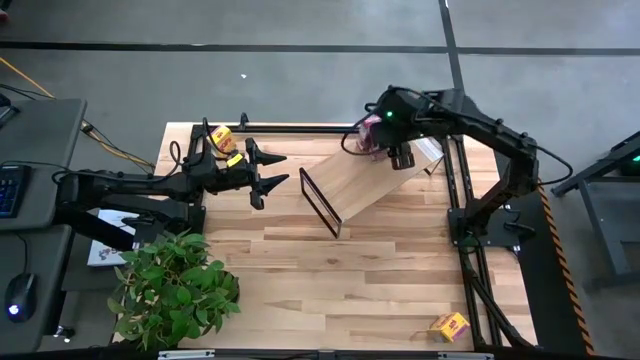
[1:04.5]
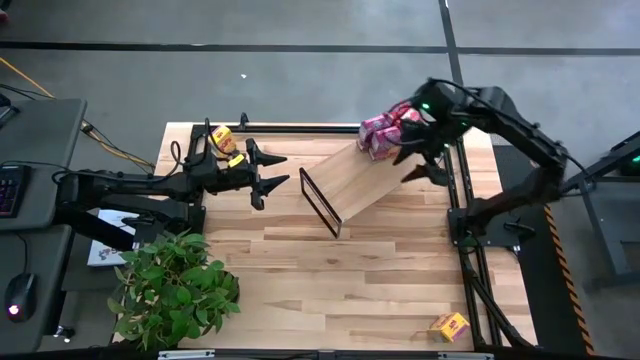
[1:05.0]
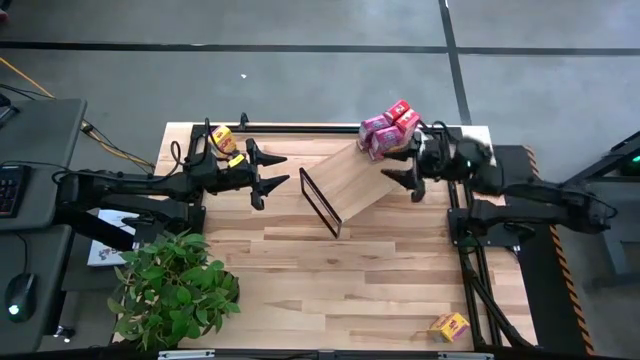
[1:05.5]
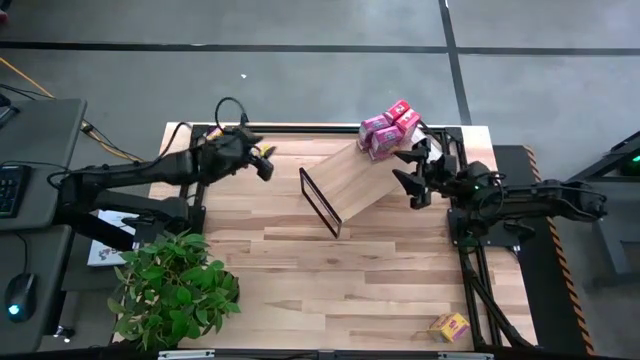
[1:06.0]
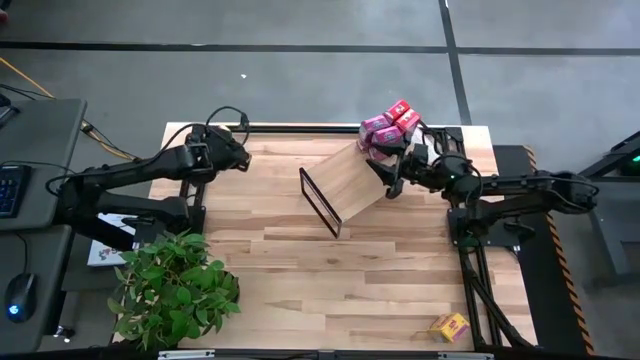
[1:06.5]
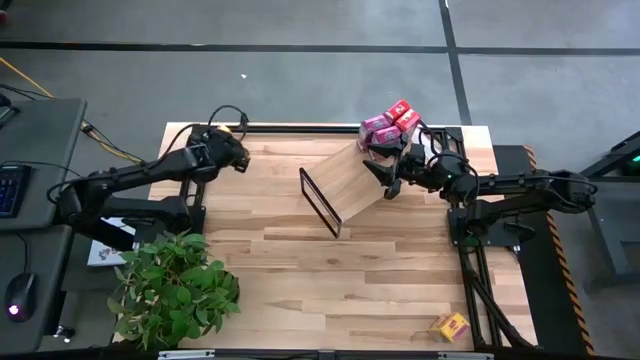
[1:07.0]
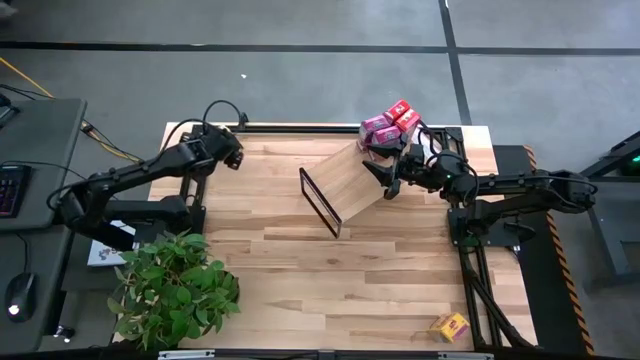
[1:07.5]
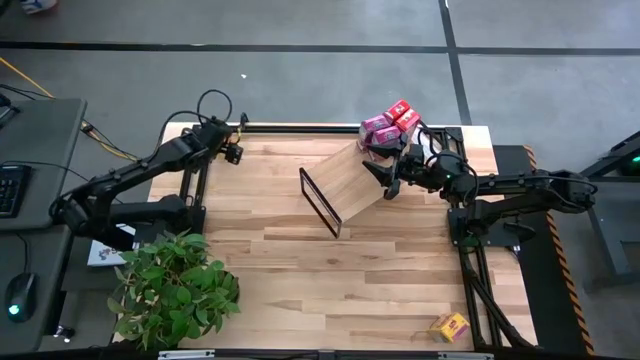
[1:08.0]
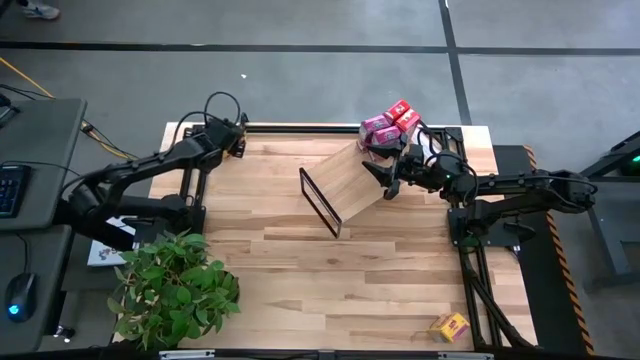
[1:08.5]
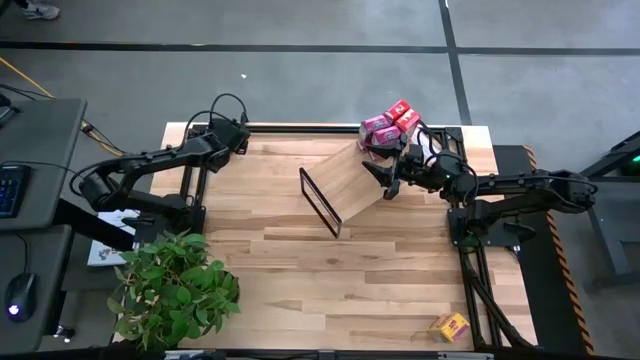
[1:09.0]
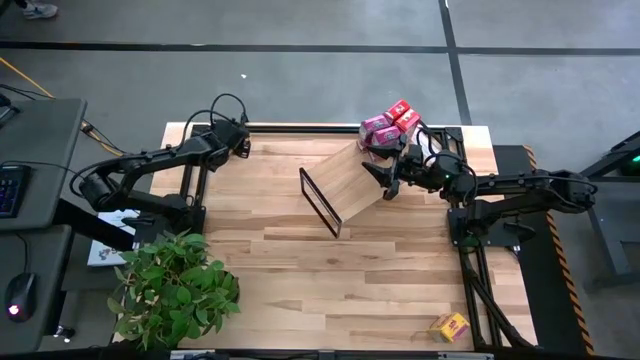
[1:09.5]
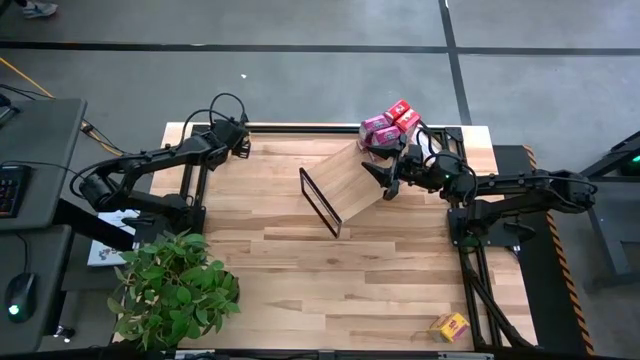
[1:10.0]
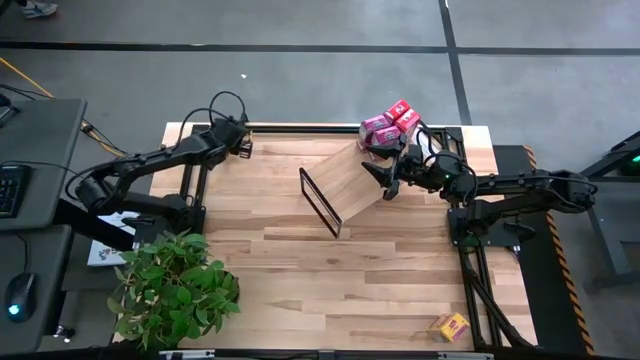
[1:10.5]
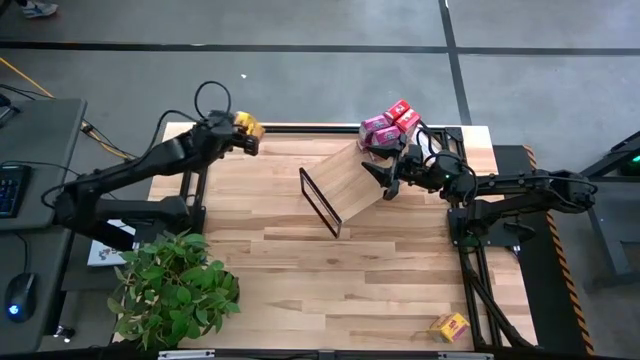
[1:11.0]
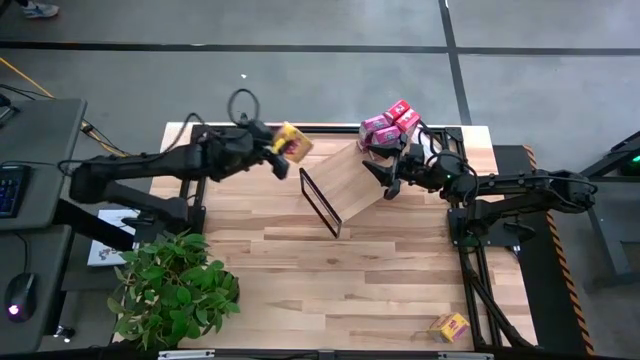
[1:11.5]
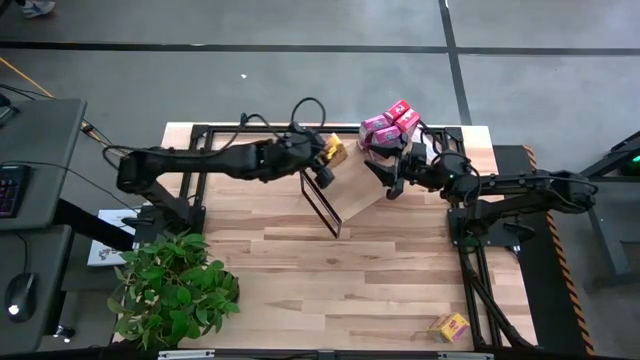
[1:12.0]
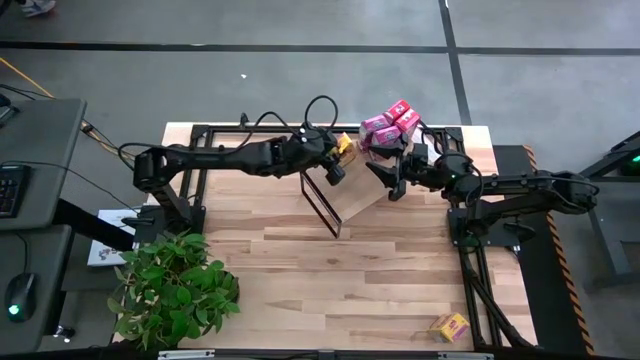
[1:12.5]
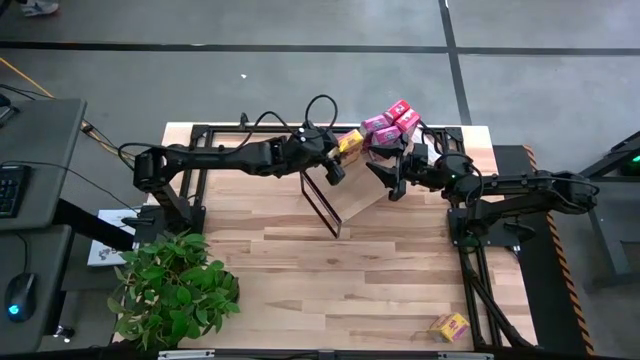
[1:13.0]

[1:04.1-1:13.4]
Task: Stack cereal on shelf
Put the top yellow cereal box on the shelf

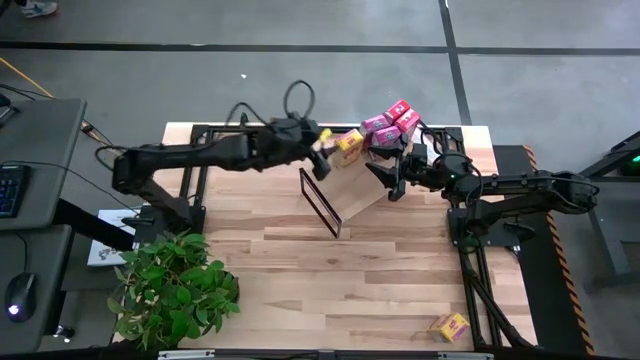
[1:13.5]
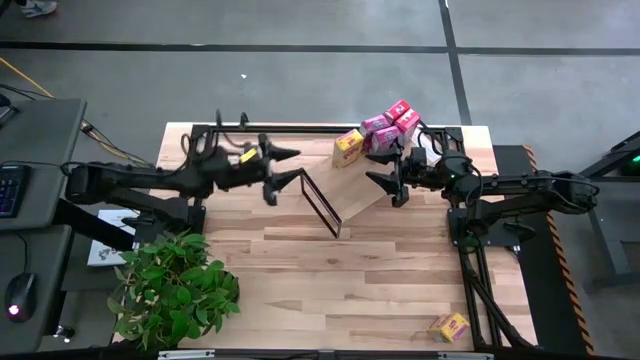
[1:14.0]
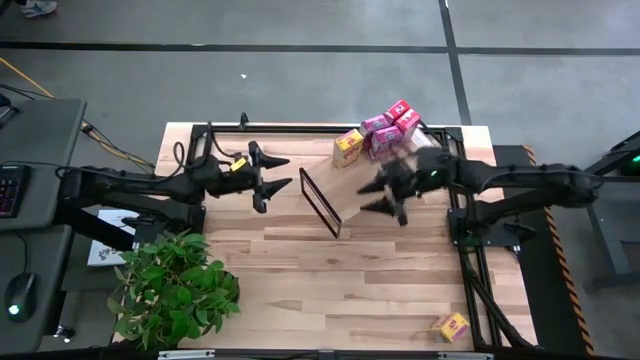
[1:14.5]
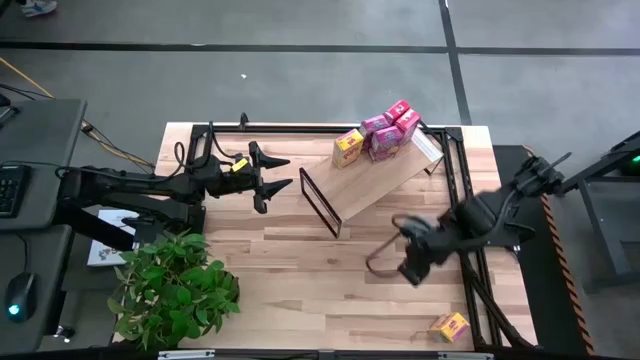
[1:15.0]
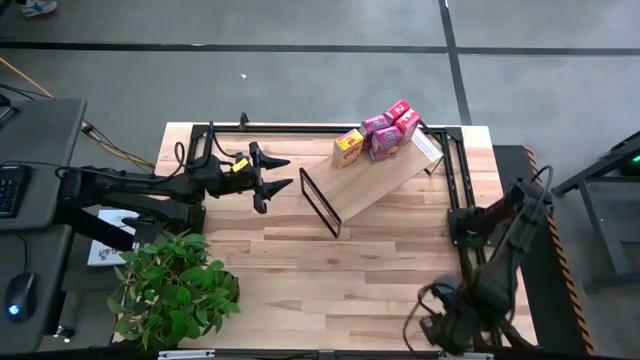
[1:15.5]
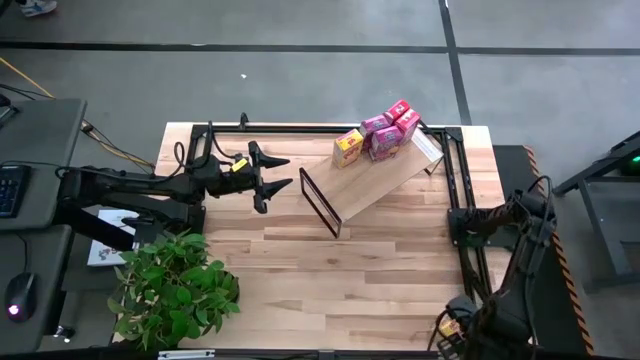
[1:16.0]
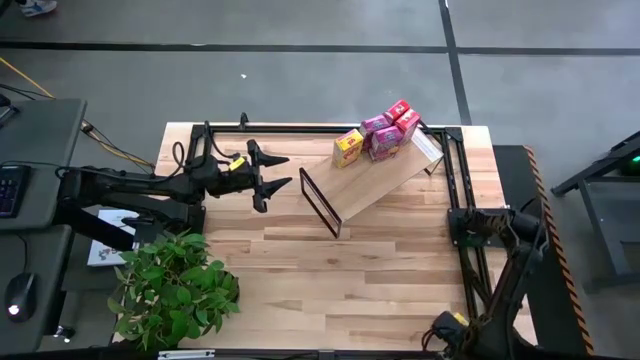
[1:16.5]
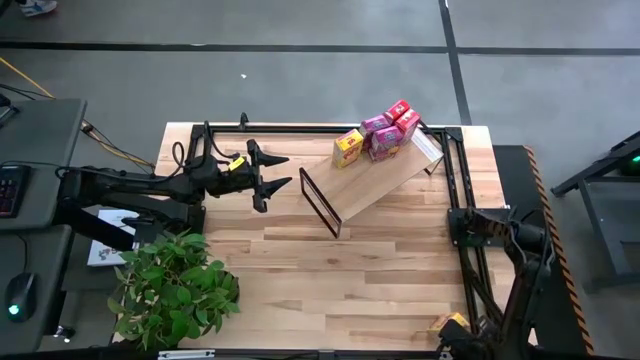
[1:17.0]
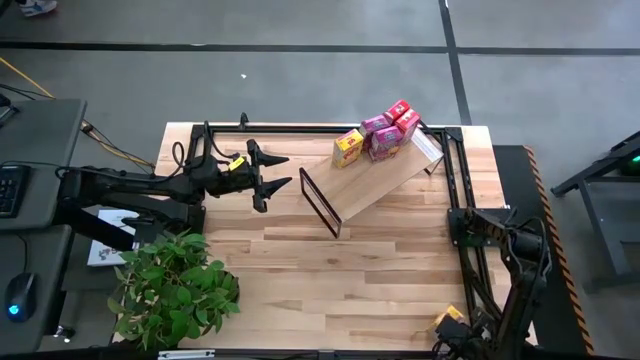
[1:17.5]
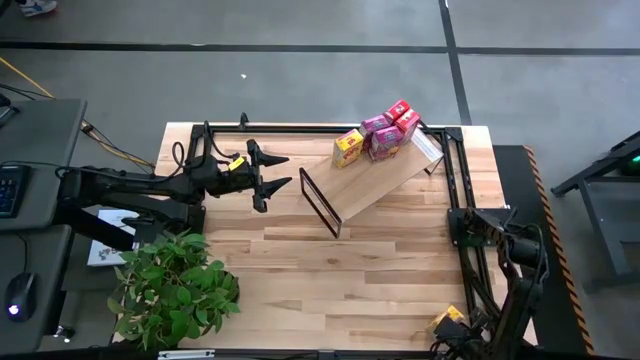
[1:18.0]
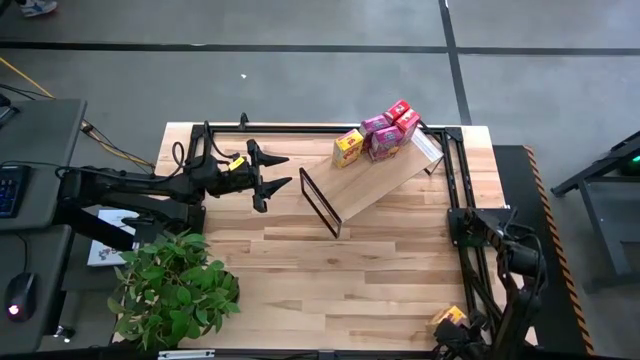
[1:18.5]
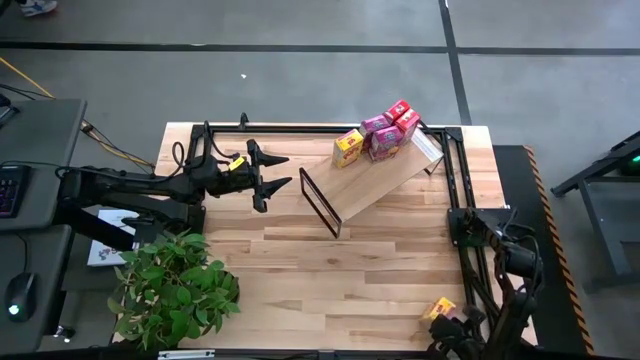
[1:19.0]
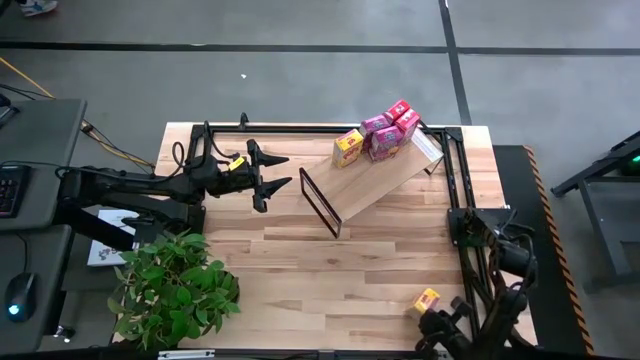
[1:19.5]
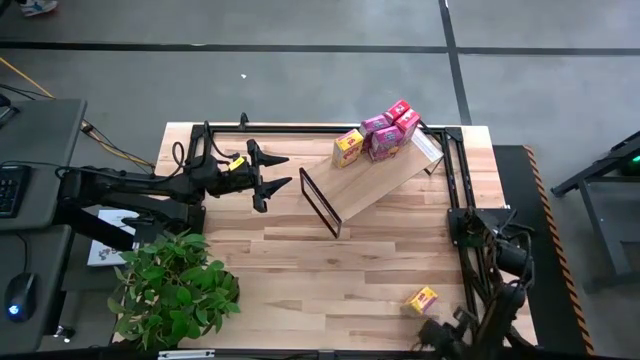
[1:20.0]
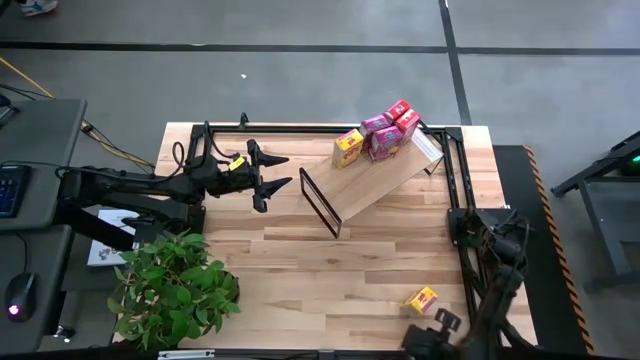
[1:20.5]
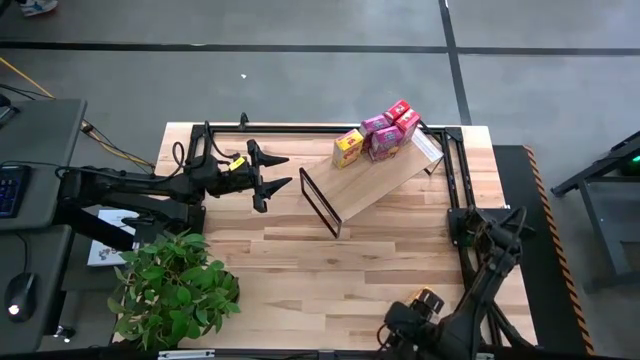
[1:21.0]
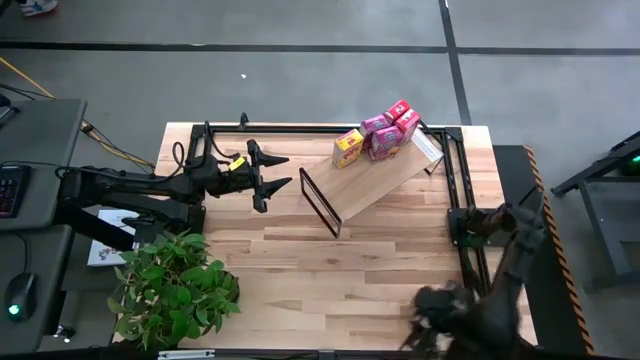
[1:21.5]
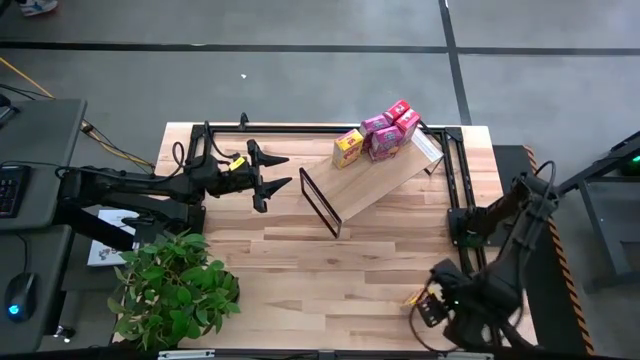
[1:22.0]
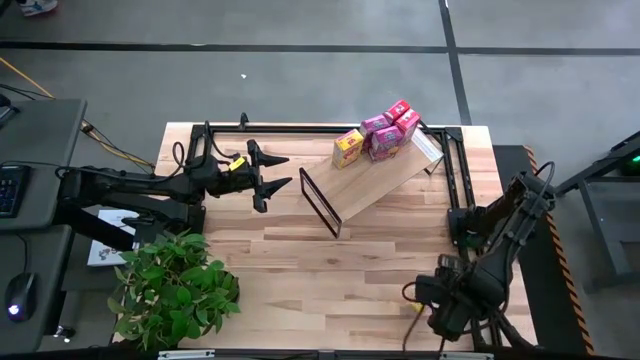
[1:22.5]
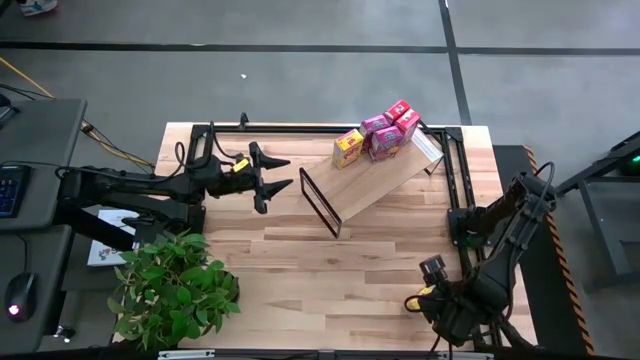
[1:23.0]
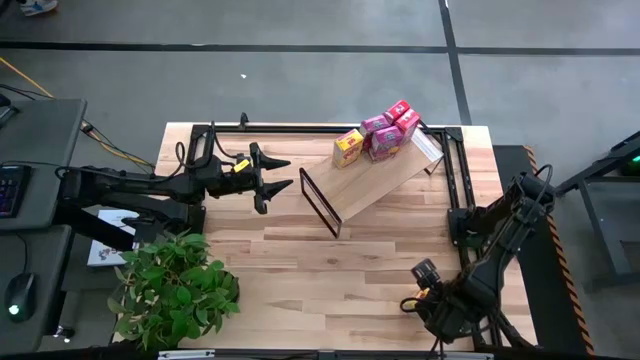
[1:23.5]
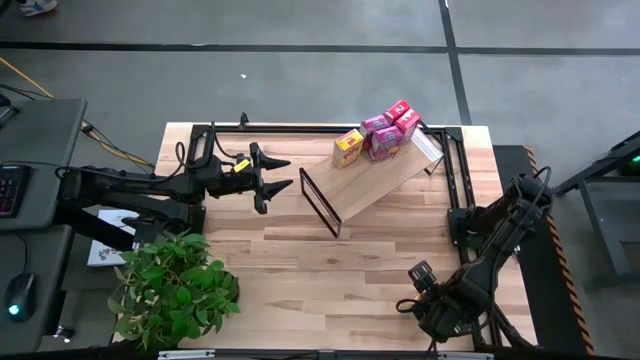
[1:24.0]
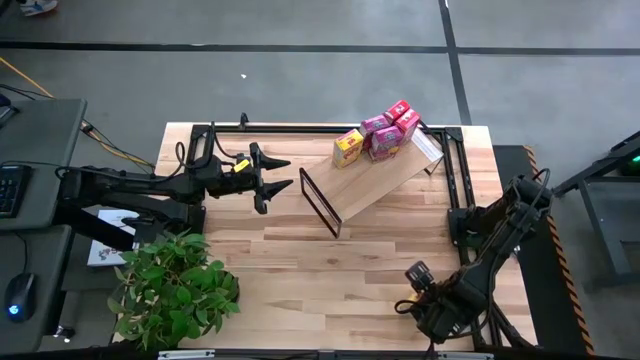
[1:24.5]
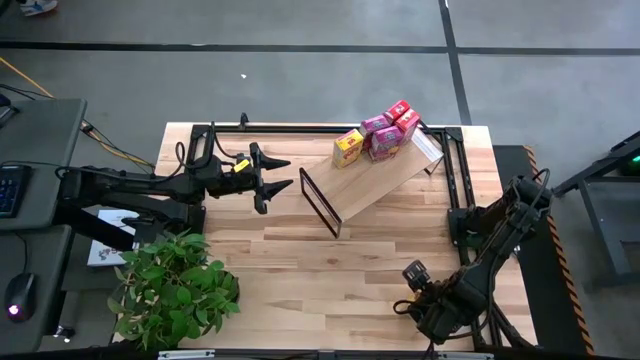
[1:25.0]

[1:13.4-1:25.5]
Put the yellow cereal box on the shelf aligned with the other yellow cereal box
